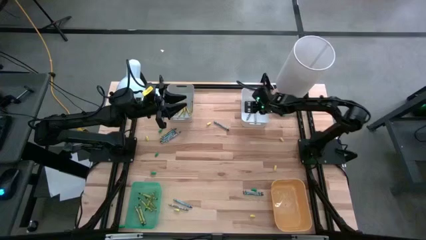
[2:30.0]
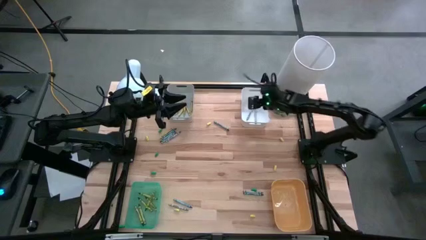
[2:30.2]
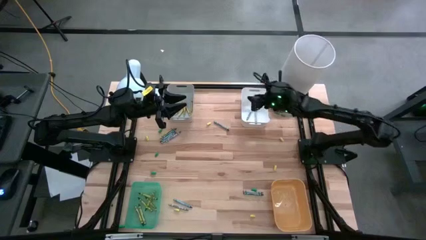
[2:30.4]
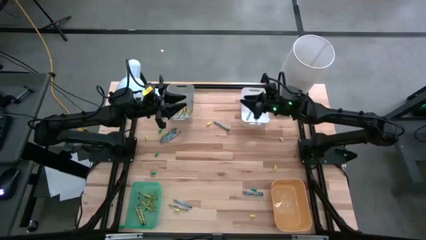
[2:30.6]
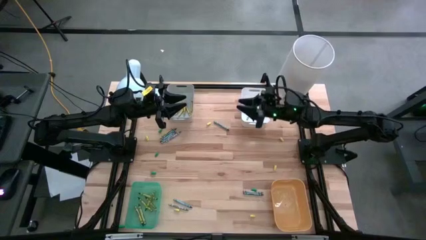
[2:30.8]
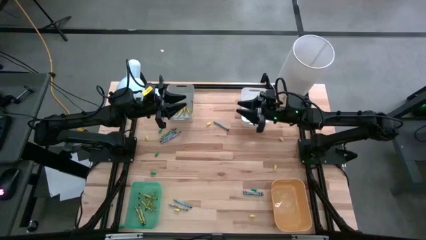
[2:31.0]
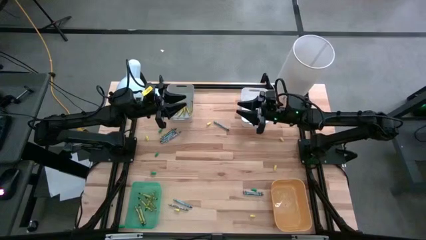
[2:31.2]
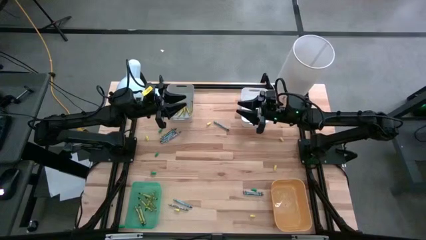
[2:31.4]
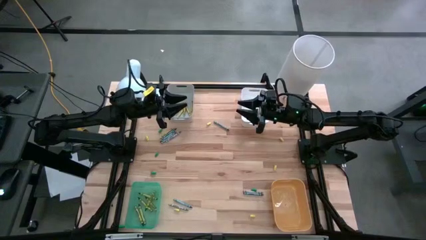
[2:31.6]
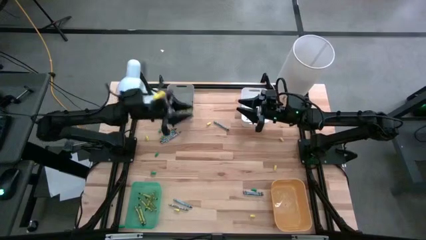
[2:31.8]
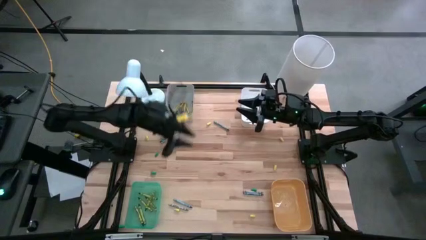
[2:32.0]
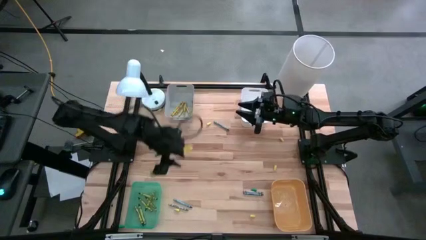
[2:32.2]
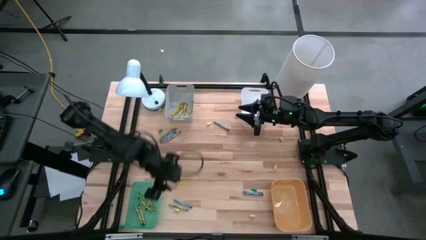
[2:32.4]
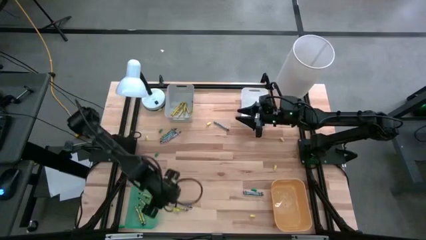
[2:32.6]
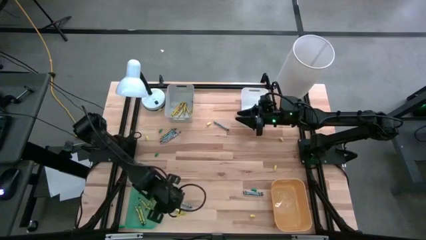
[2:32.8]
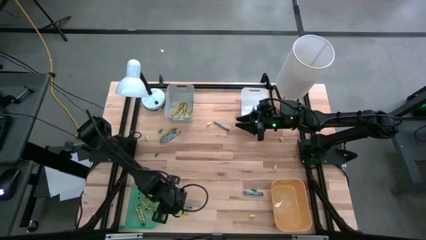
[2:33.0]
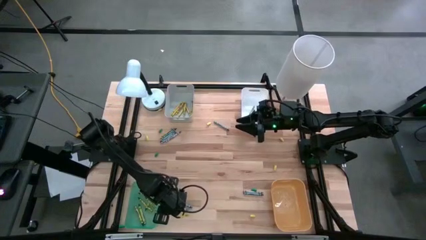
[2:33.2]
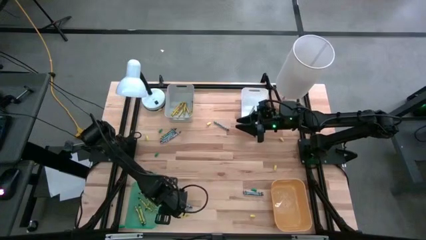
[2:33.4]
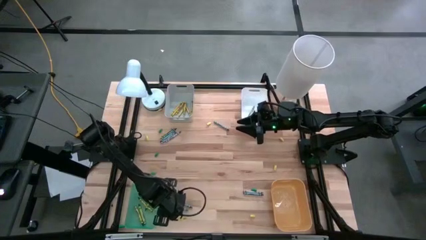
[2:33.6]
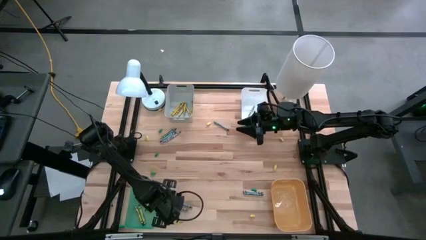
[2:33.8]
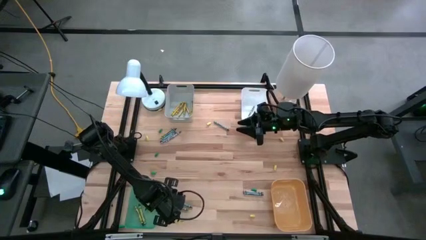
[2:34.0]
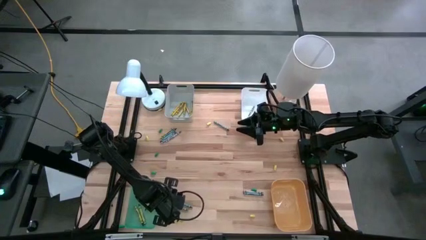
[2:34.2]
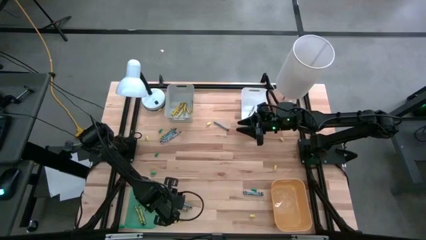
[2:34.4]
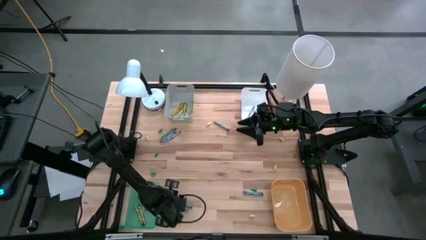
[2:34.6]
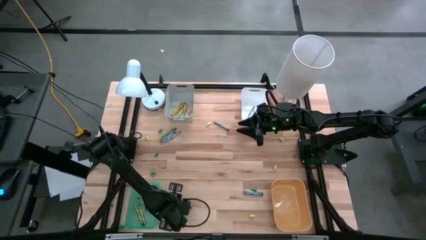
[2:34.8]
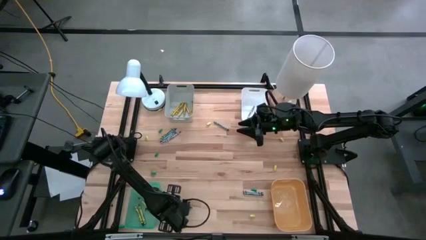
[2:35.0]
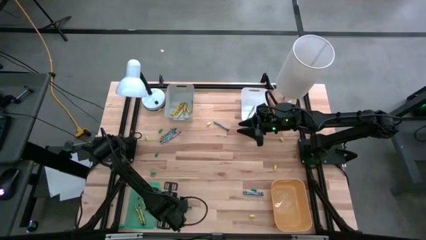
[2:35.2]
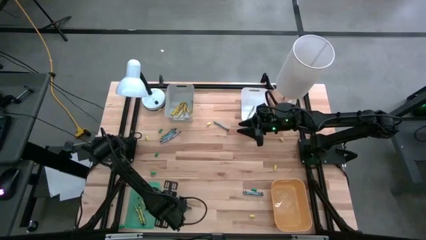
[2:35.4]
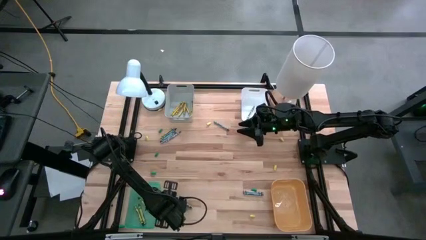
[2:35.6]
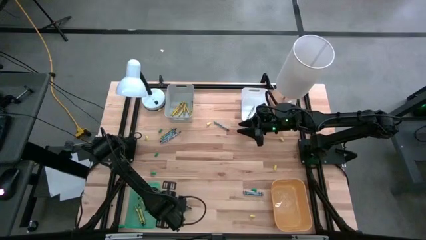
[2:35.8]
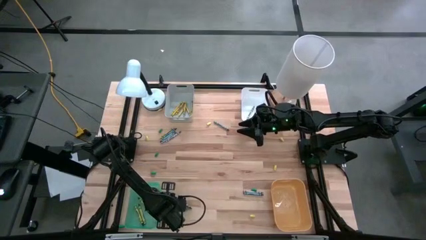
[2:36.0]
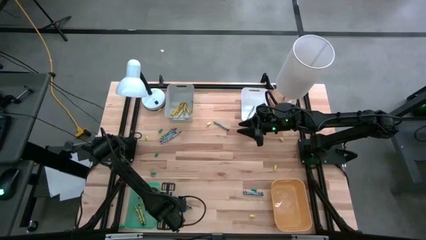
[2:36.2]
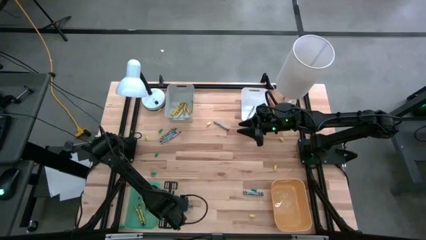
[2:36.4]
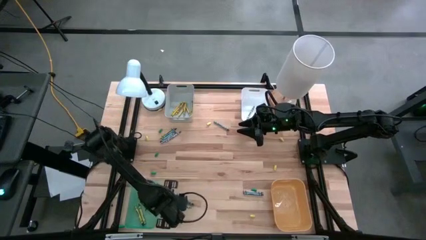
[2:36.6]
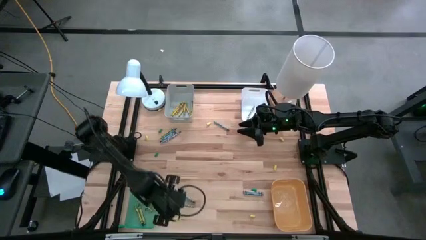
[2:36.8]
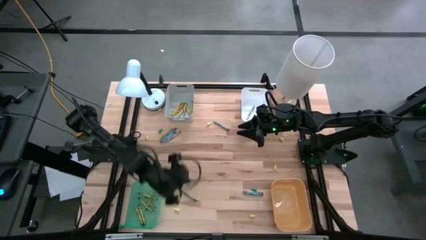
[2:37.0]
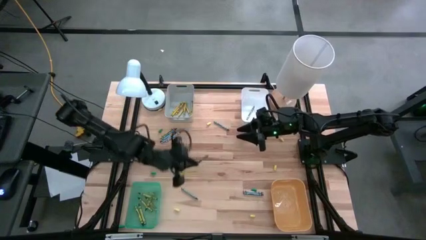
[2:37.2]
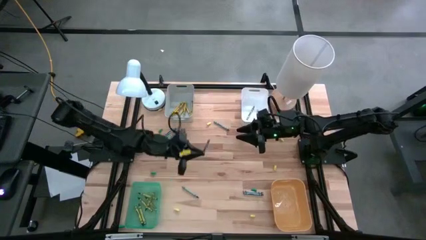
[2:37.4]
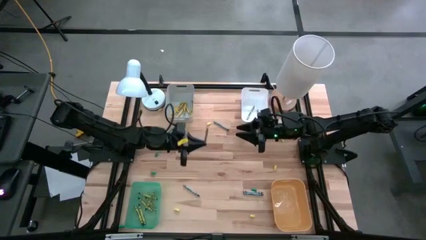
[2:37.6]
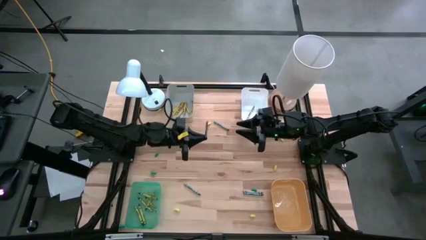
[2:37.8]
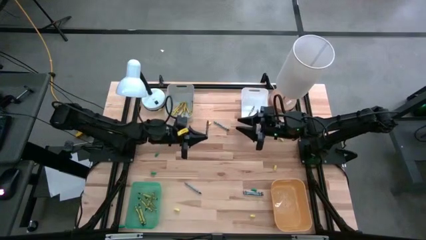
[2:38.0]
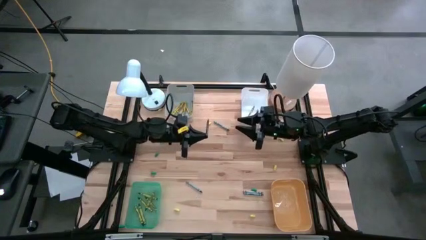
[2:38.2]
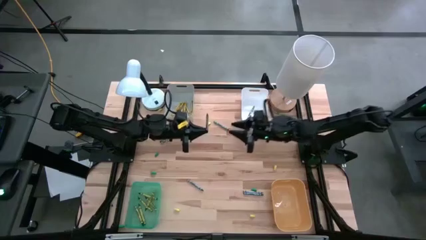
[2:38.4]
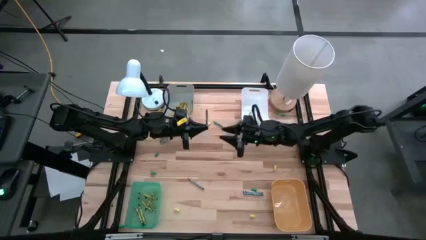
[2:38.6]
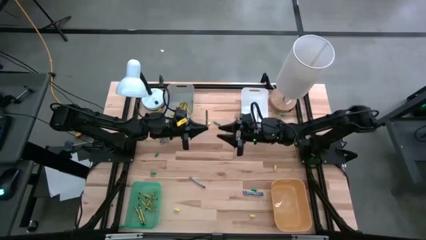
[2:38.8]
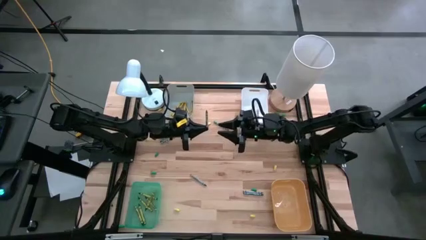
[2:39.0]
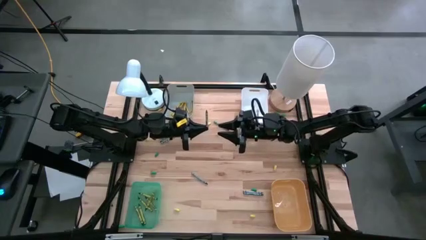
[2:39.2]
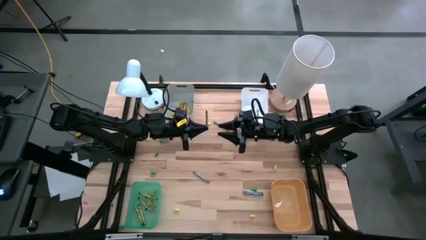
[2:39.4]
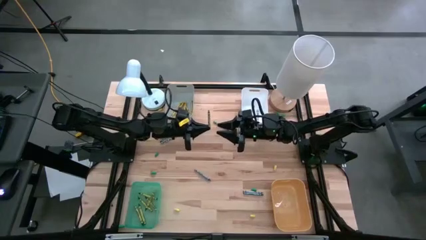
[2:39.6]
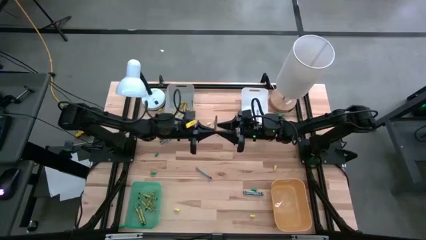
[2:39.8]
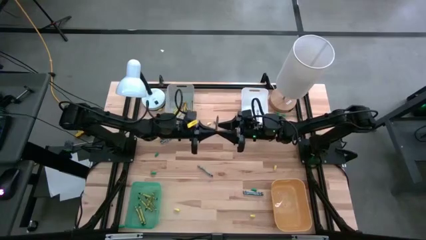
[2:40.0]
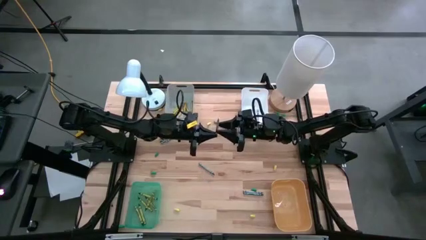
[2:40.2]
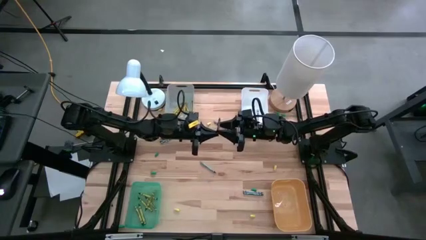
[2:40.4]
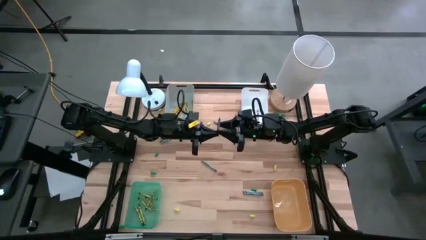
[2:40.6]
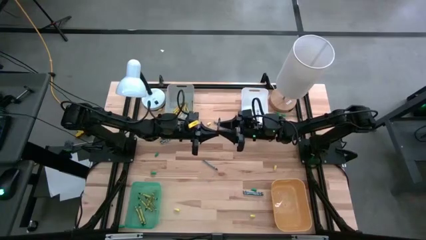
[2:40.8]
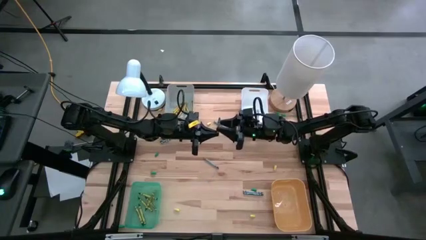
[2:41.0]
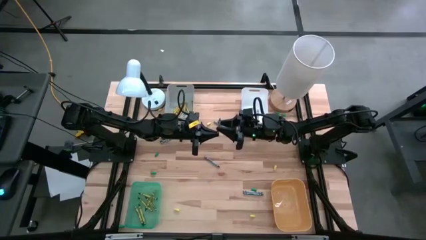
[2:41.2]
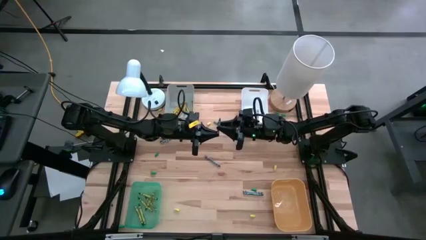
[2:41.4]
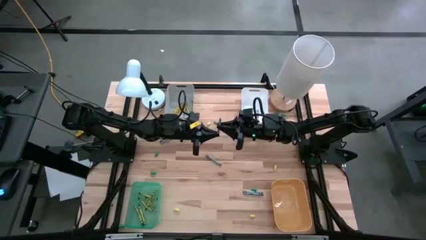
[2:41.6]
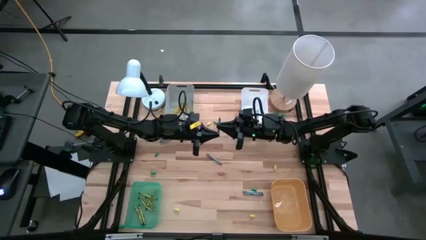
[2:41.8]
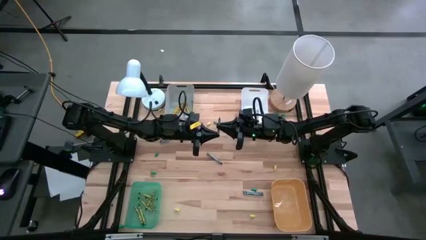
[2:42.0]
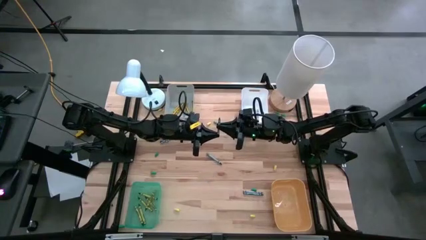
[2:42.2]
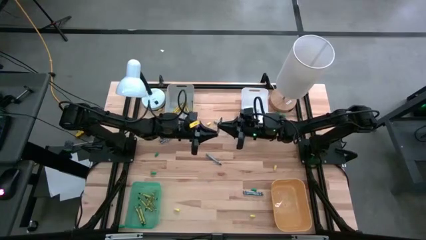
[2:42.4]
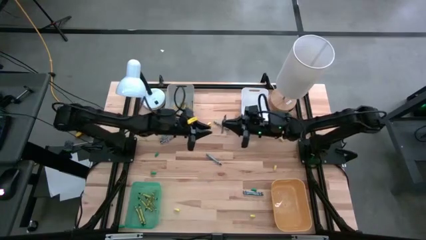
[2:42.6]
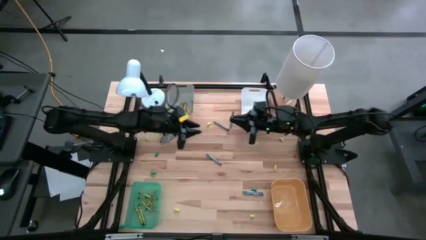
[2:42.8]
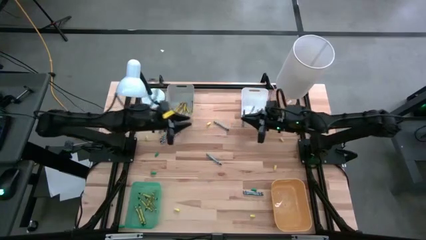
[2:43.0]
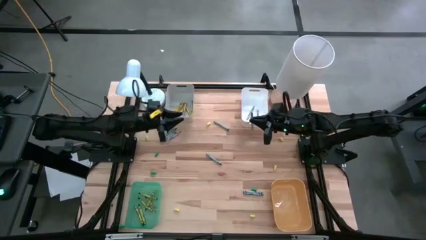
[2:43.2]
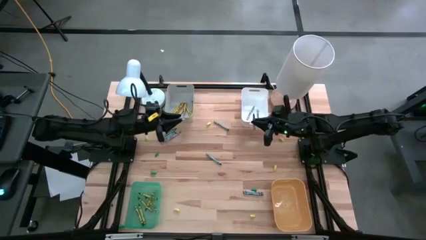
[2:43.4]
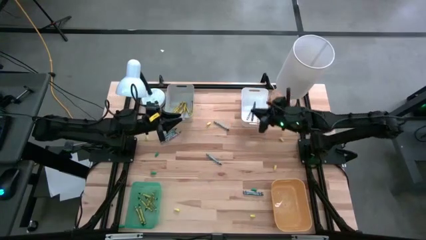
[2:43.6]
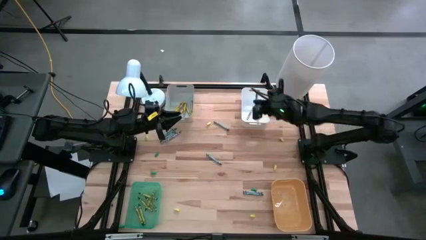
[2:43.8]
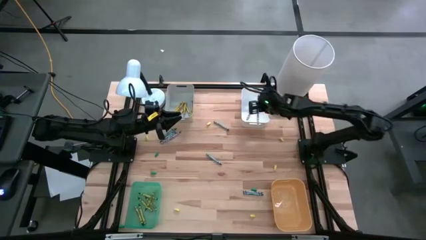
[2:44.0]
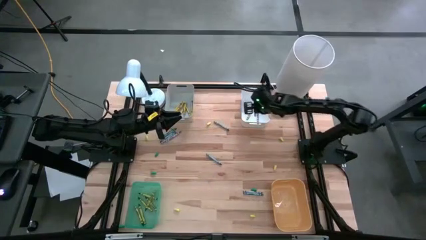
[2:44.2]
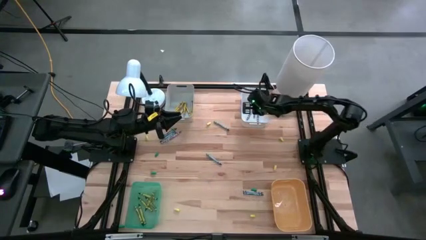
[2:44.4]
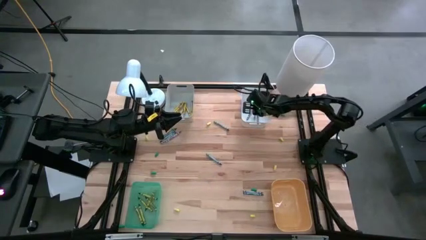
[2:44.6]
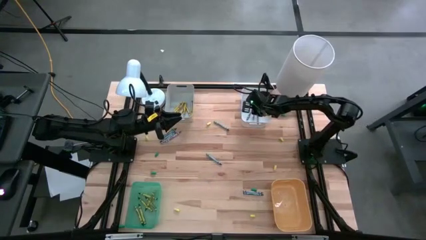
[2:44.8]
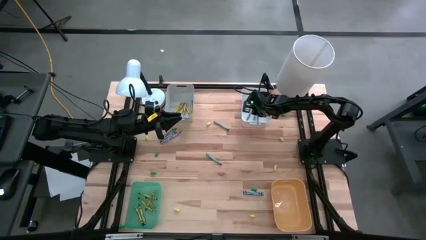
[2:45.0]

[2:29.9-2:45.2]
Task: Sort crayons
Put the gray crayon into the white bin
